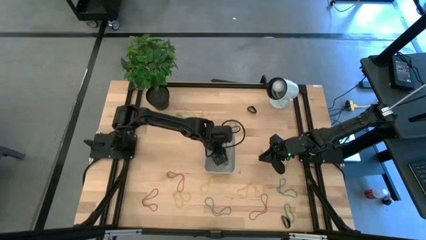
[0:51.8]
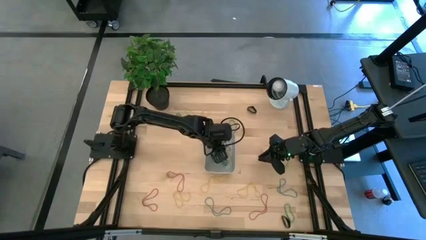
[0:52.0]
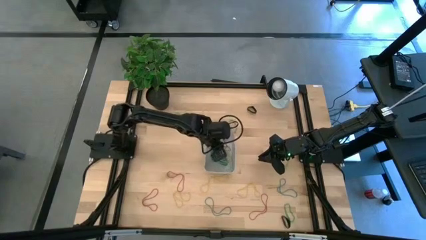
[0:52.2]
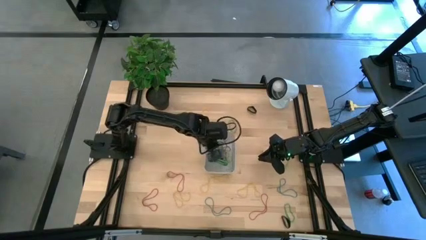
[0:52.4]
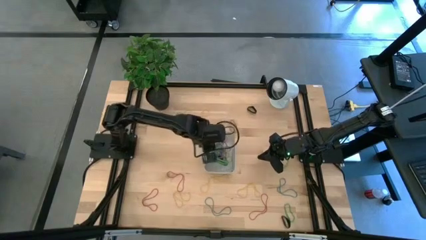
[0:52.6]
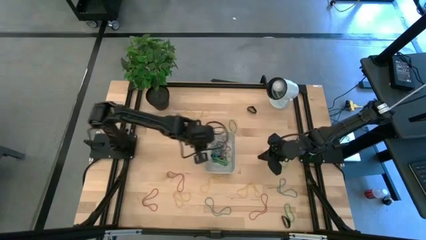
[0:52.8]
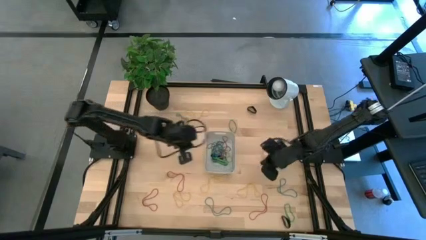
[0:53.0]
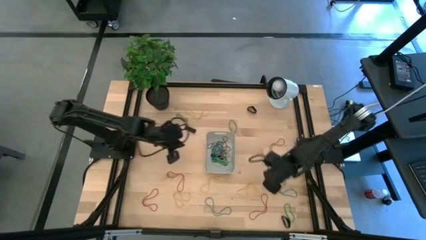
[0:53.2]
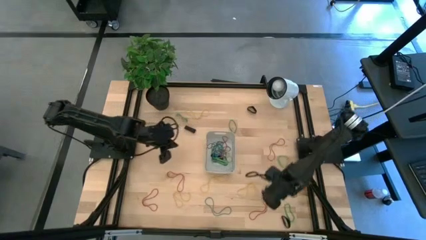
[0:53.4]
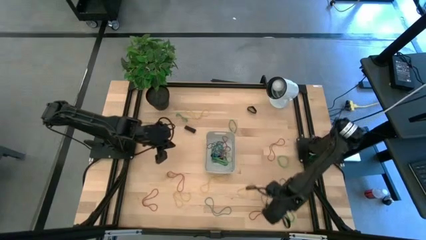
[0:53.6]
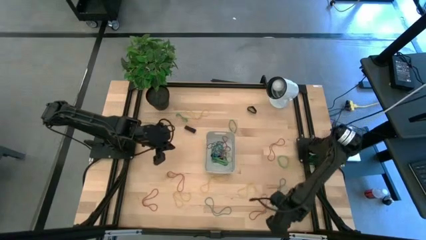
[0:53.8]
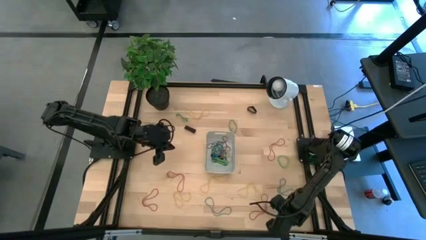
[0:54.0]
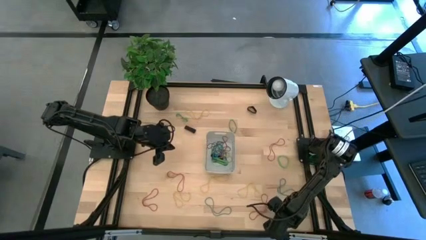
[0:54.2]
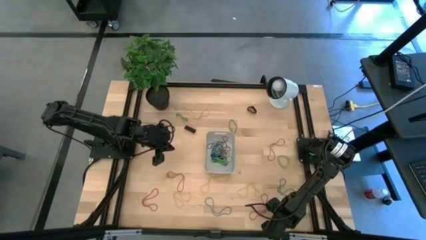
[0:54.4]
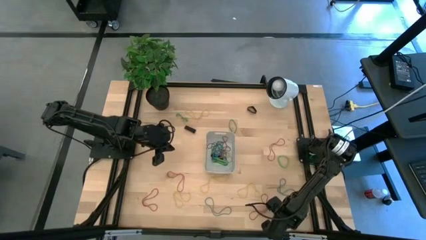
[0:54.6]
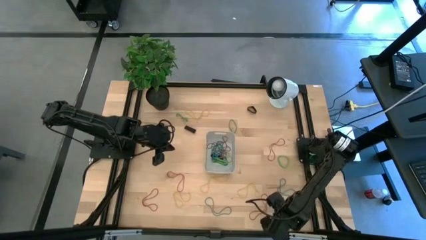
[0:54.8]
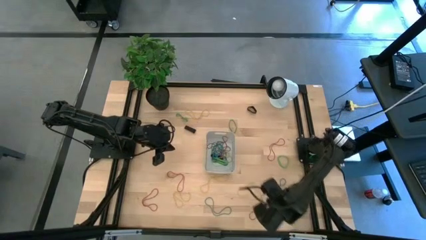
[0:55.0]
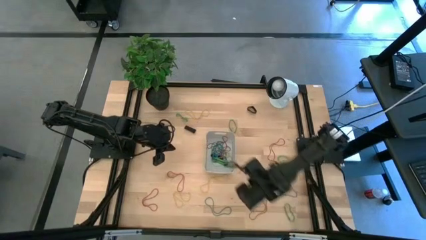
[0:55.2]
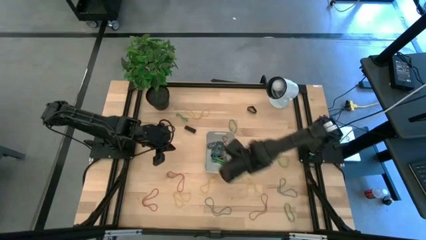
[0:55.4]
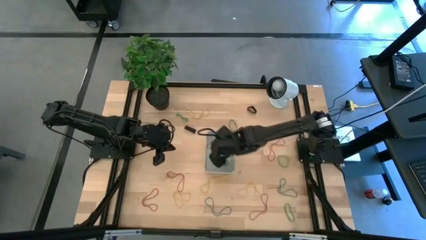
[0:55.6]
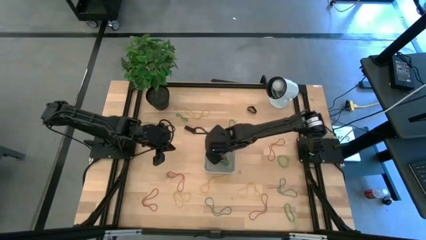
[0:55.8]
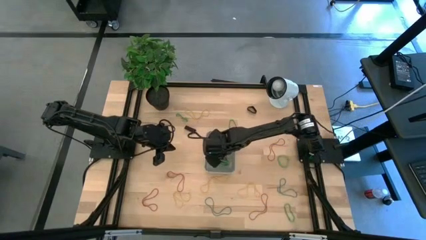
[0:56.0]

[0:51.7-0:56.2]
Task: Pick and place rubber bands into bin
Put the black rubber band into the gray bin

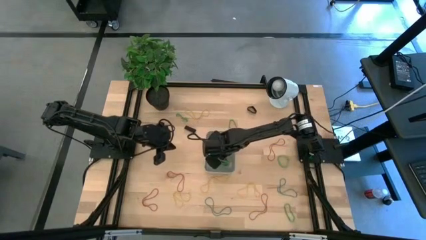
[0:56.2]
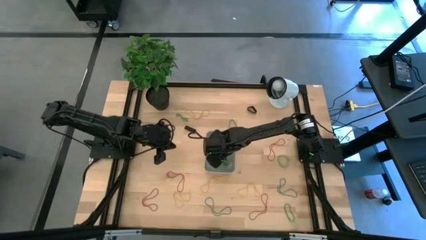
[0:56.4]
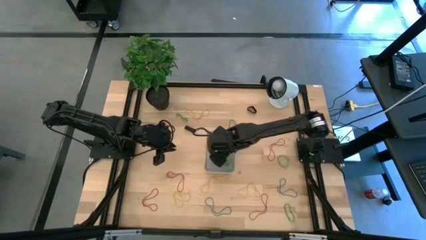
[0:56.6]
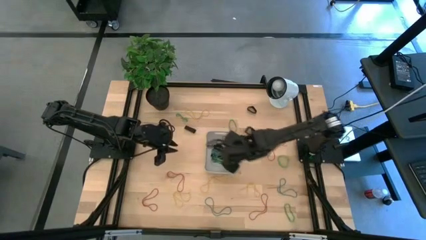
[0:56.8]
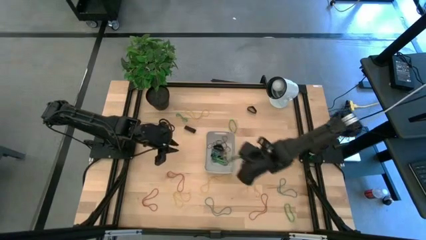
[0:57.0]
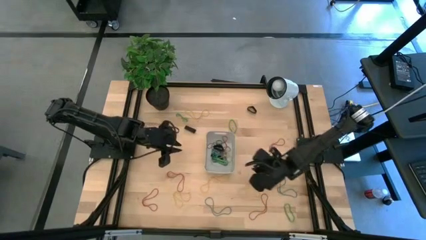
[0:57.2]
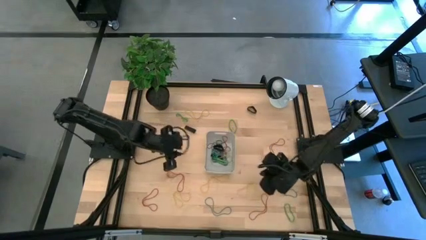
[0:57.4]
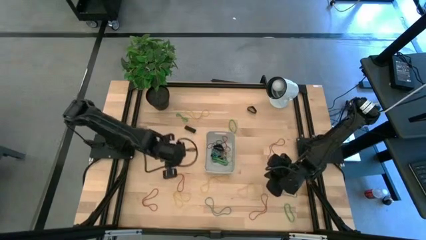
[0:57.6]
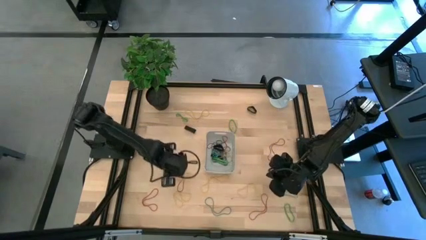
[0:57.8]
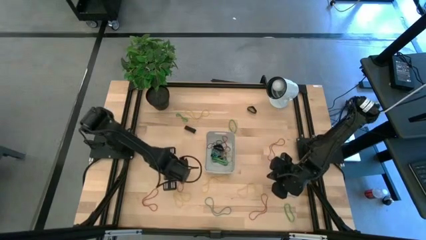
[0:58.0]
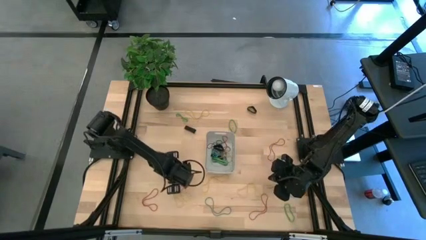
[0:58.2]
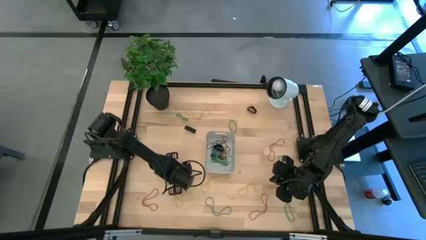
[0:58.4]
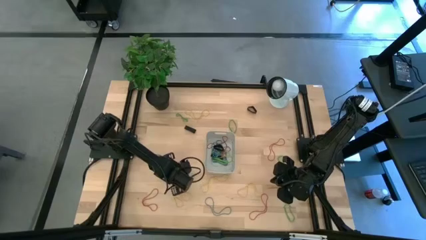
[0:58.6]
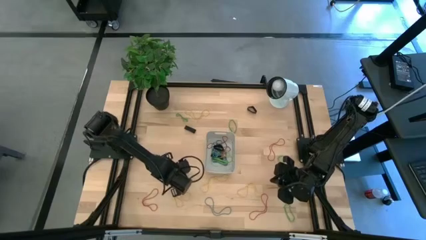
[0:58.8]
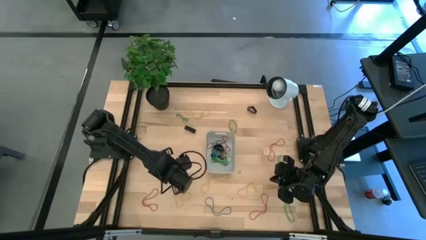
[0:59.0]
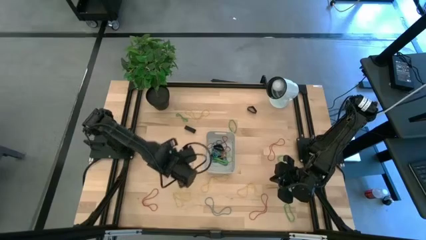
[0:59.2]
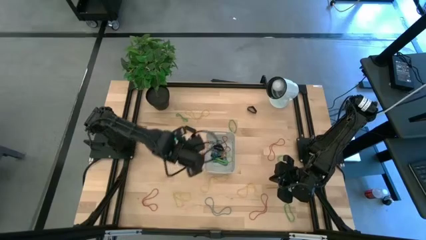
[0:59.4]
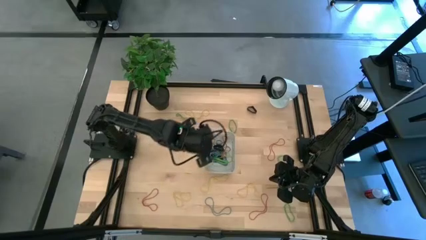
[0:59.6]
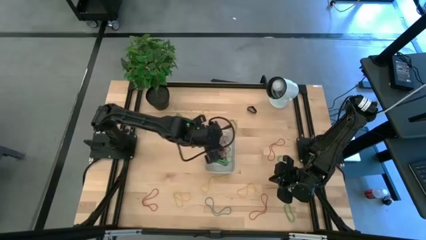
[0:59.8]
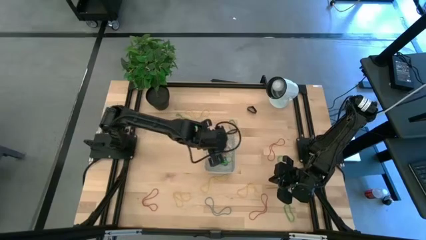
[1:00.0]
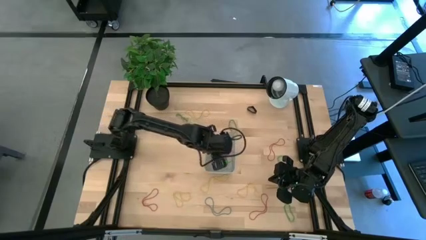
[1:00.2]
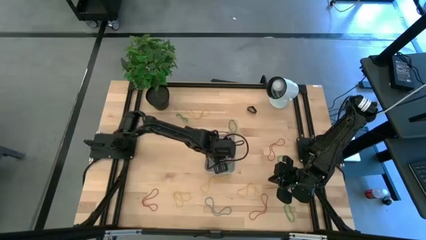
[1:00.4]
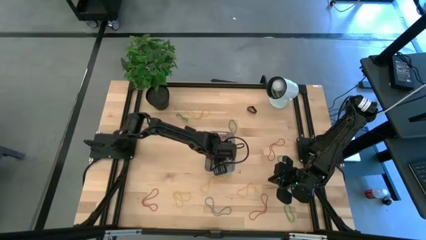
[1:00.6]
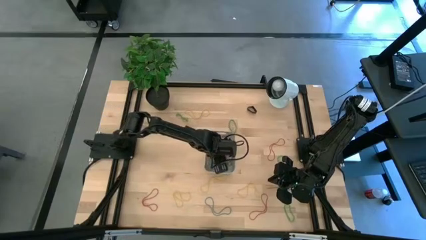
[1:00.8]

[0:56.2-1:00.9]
Put the red rubber band into the gray bin

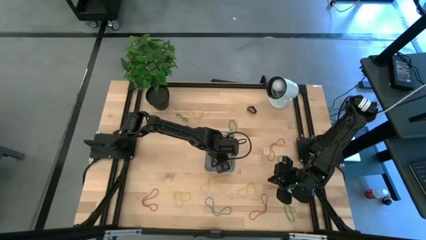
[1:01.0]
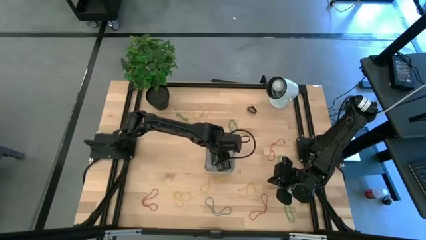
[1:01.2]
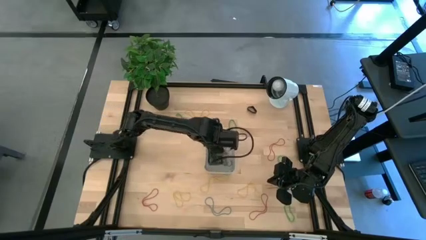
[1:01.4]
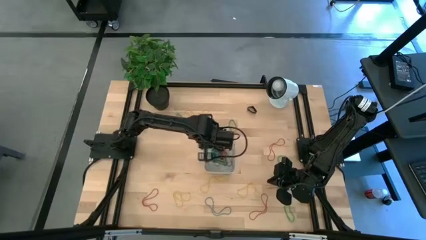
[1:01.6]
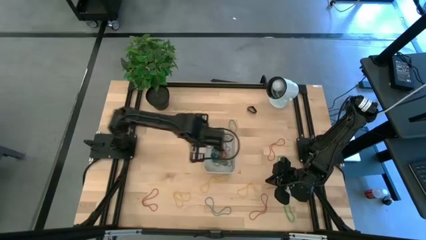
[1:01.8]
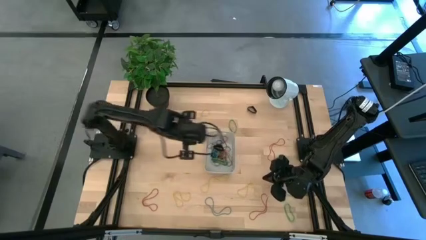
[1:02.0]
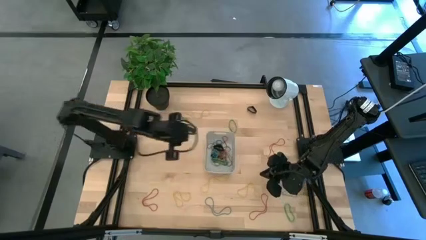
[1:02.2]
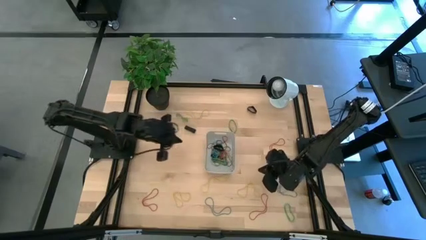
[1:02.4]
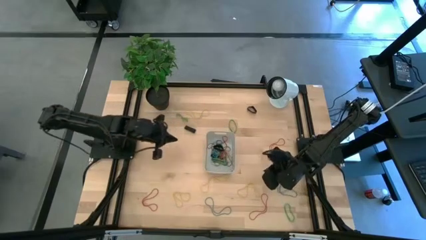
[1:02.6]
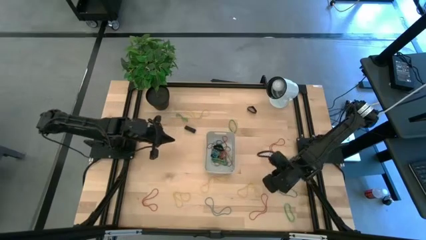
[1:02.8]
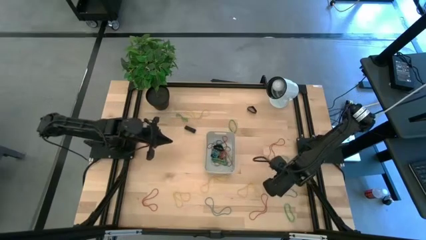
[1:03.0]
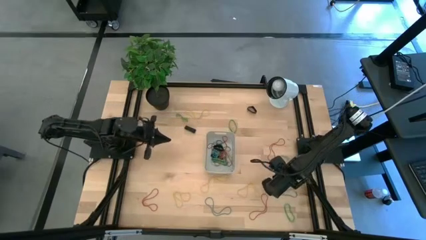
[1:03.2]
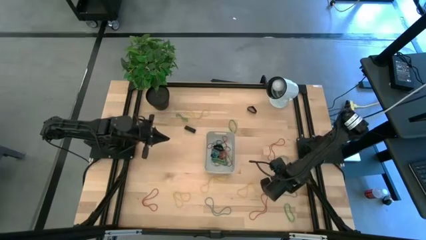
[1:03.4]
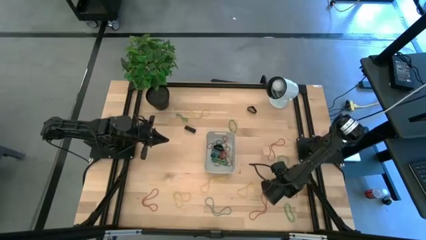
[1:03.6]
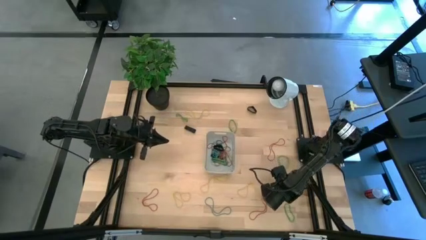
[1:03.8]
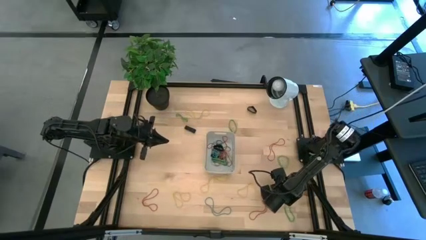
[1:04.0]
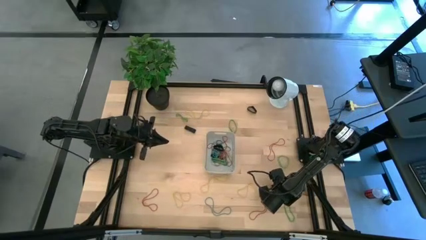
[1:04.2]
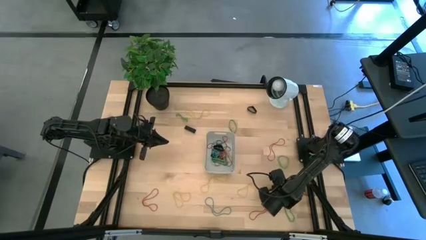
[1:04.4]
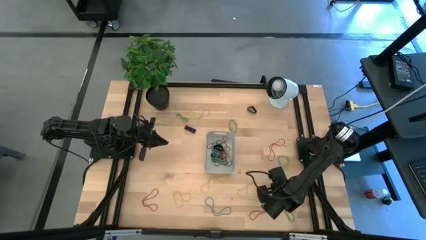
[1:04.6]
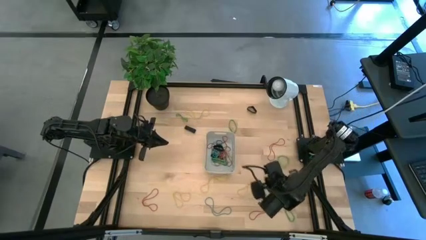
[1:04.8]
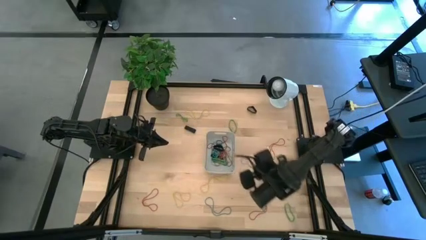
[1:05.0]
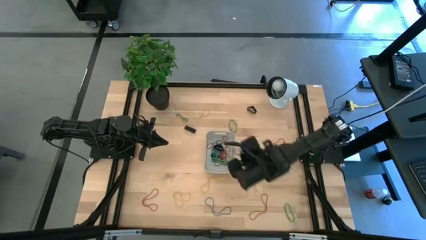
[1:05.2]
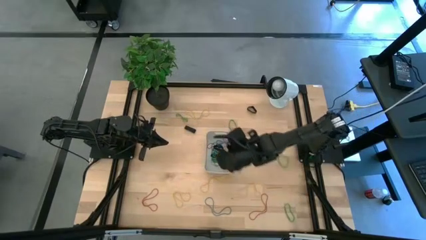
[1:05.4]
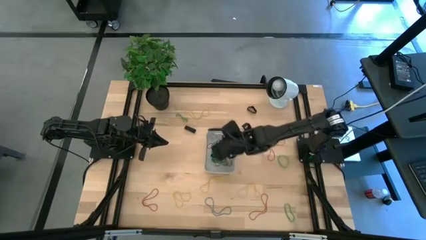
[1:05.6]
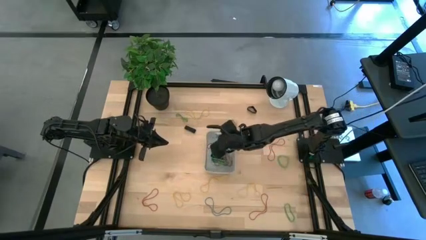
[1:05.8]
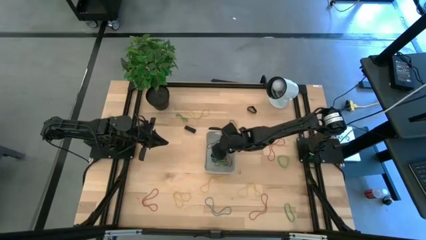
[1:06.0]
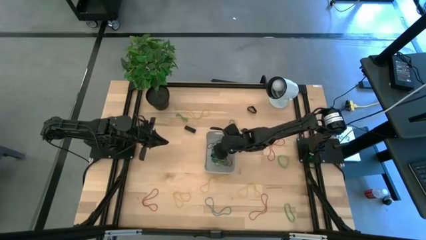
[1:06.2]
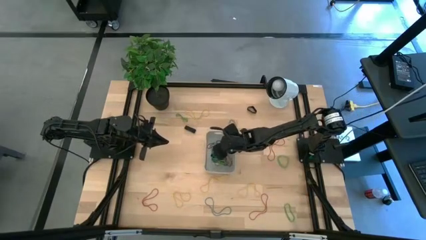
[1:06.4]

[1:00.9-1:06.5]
Put the blue rubber band into the gray bin

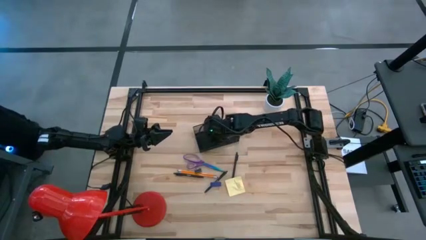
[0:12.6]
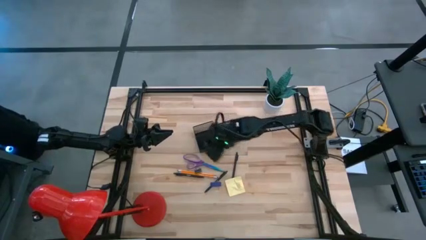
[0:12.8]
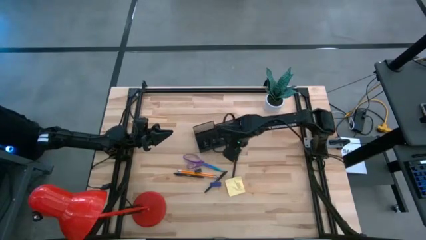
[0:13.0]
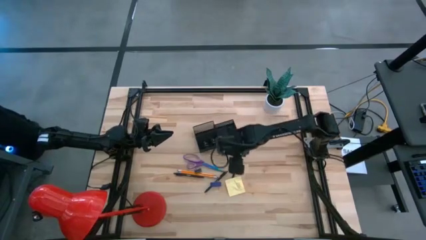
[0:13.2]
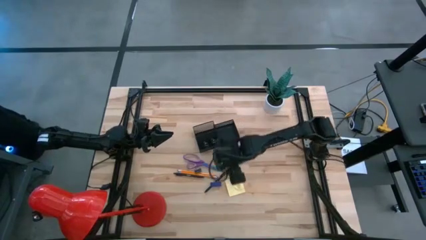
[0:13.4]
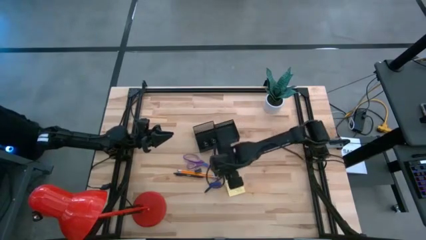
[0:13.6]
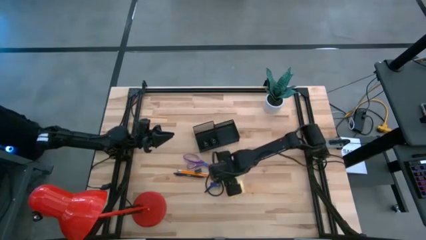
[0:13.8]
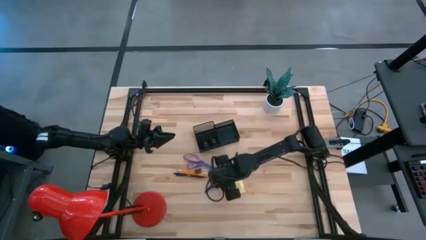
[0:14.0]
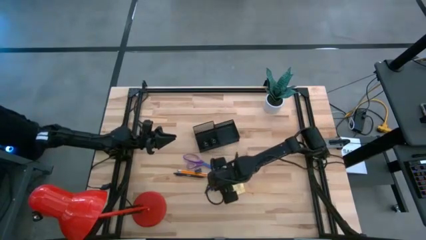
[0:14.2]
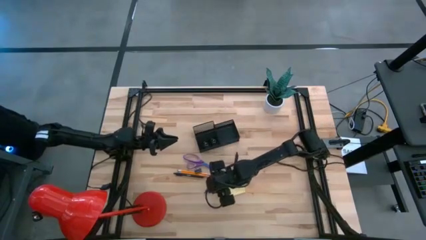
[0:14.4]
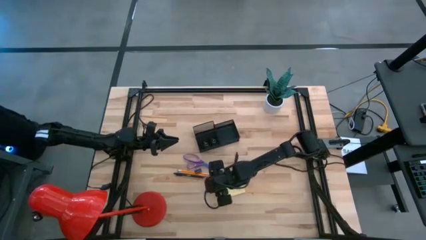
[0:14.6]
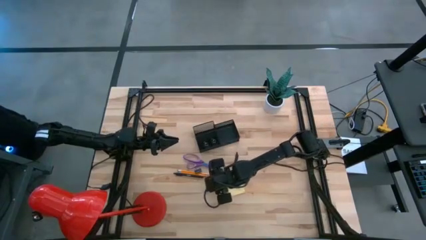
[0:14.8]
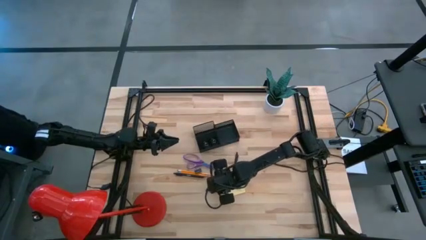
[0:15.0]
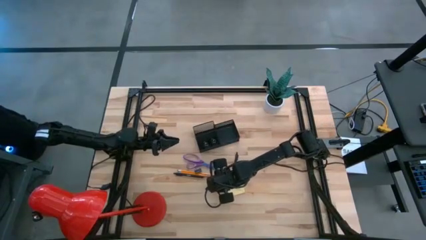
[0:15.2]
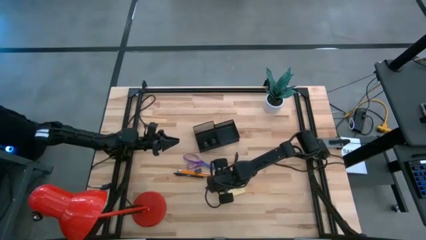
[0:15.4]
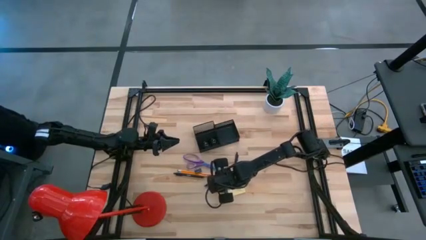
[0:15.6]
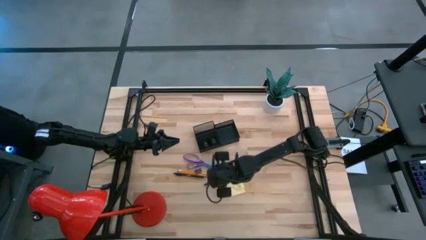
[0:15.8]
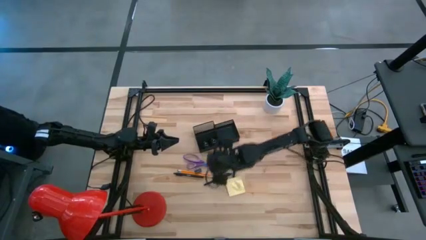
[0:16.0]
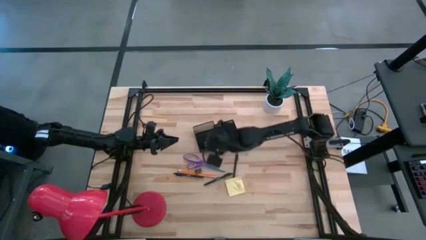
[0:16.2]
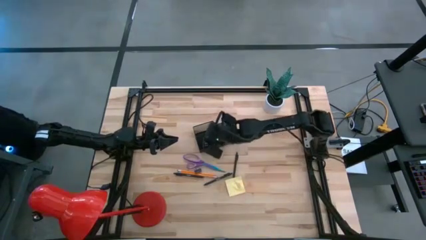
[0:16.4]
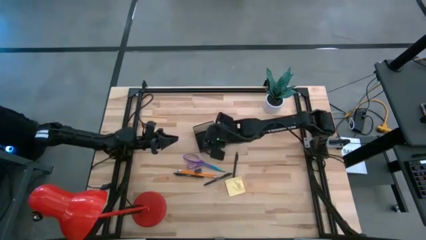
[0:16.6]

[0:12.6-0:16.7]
Task: Pick and place office supplies into organizer
Put the blue eraser into the black desk organizer
